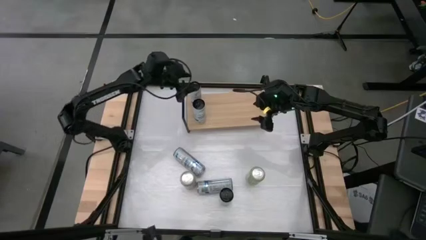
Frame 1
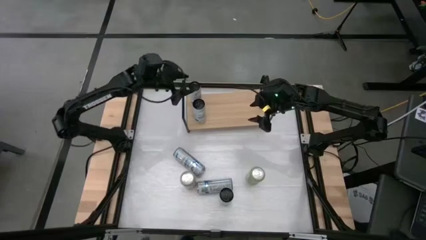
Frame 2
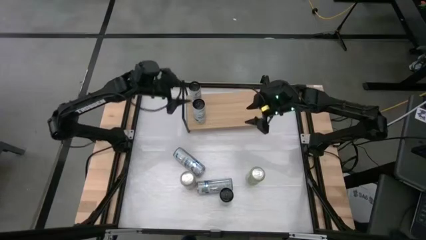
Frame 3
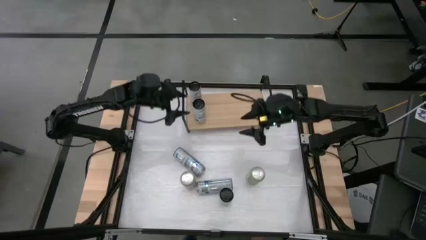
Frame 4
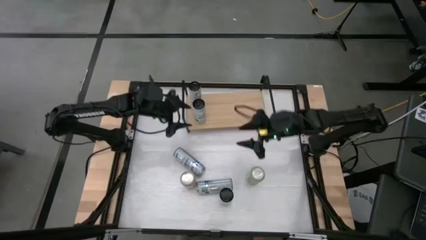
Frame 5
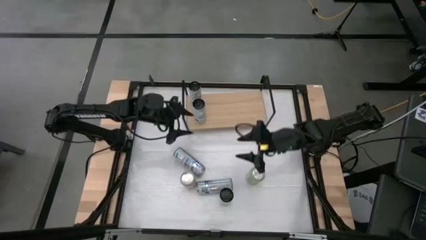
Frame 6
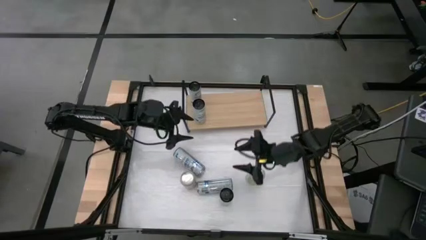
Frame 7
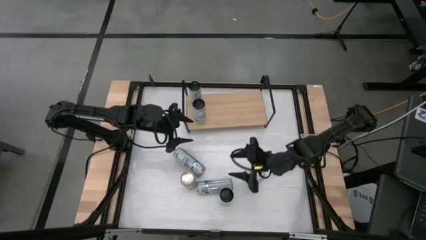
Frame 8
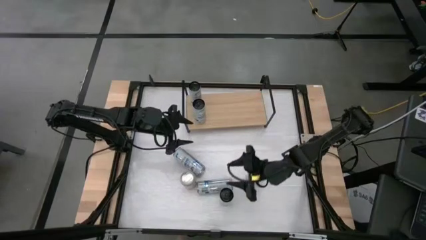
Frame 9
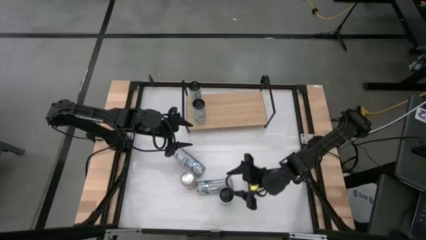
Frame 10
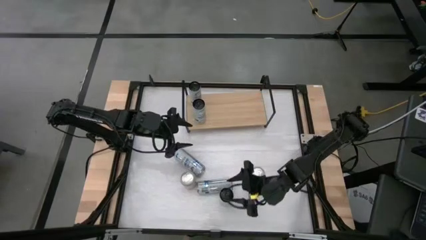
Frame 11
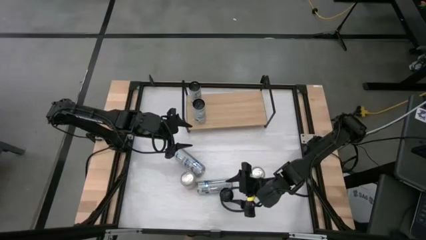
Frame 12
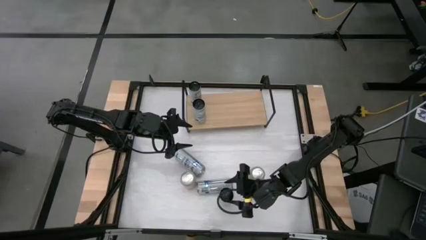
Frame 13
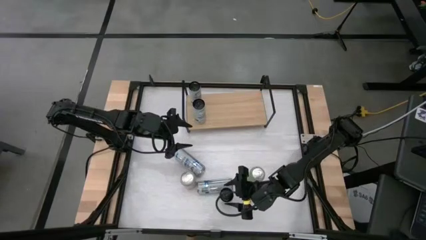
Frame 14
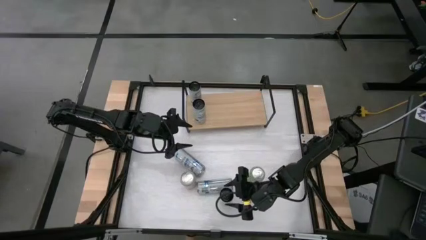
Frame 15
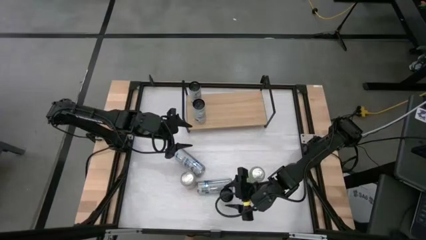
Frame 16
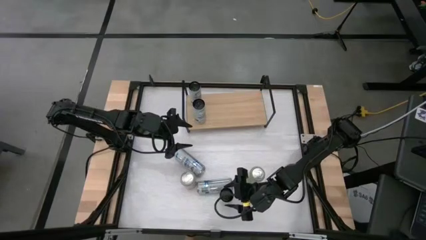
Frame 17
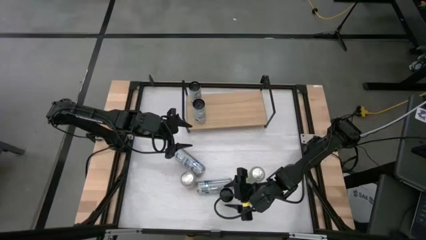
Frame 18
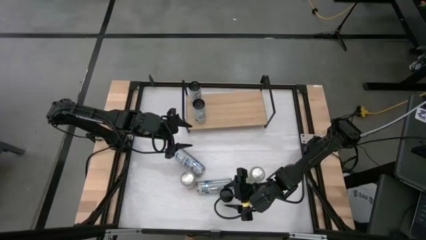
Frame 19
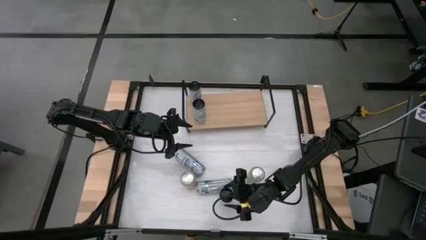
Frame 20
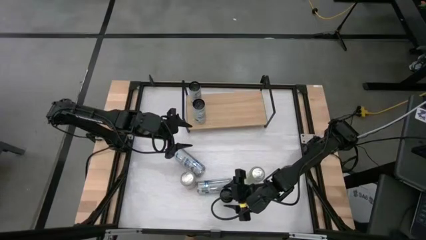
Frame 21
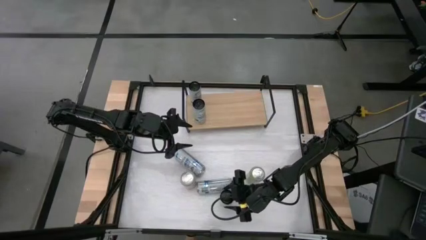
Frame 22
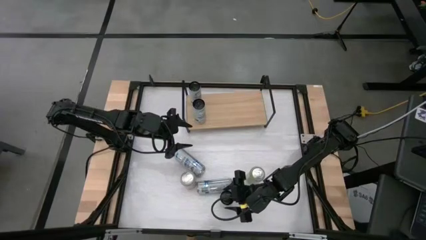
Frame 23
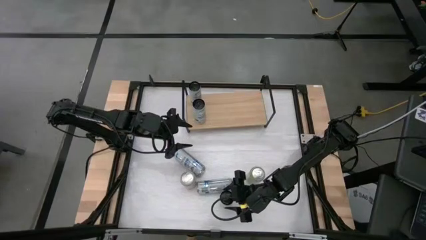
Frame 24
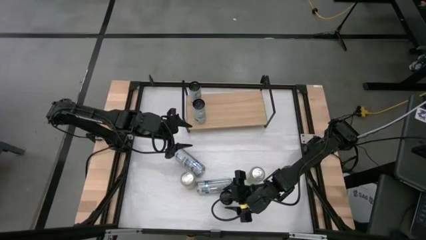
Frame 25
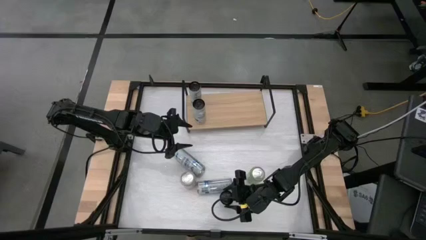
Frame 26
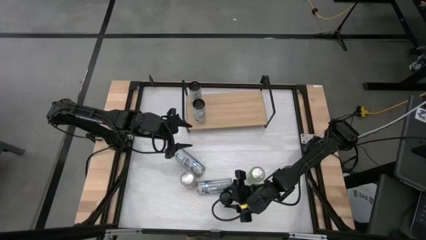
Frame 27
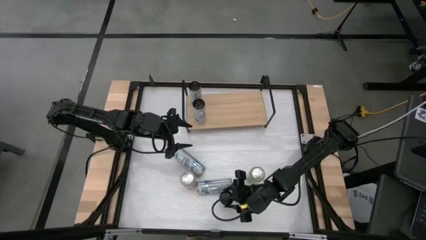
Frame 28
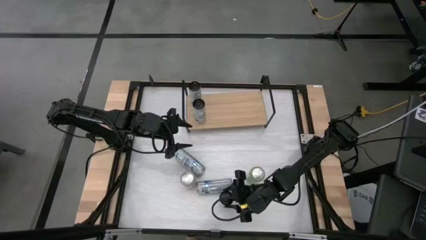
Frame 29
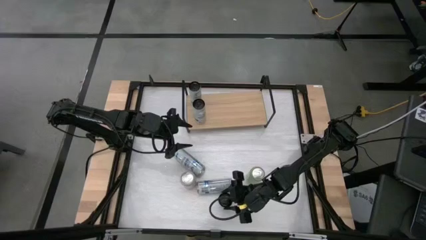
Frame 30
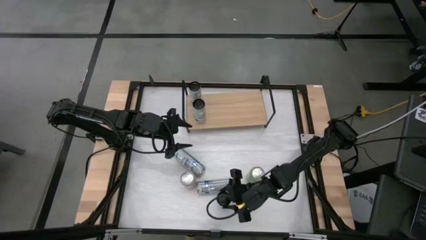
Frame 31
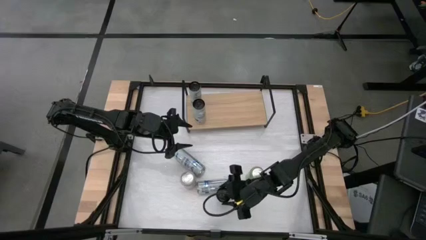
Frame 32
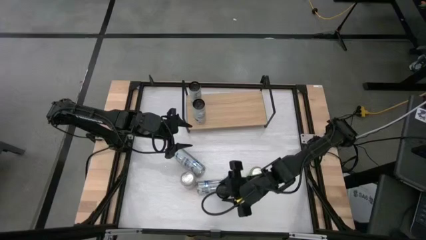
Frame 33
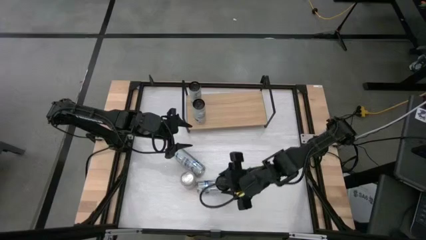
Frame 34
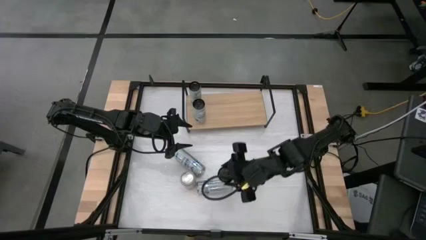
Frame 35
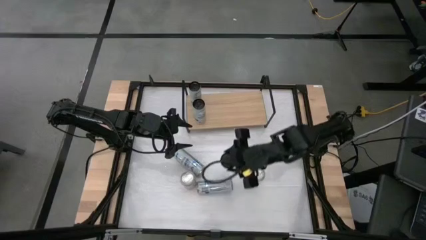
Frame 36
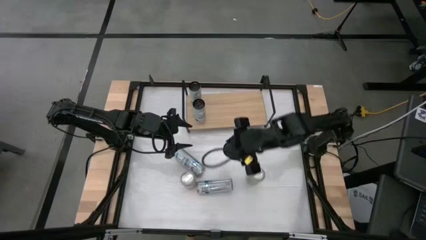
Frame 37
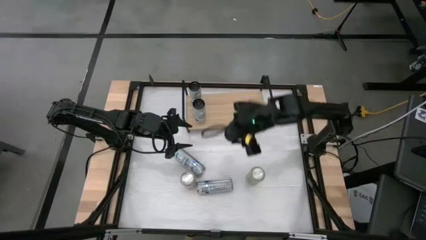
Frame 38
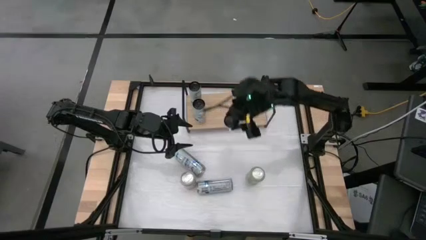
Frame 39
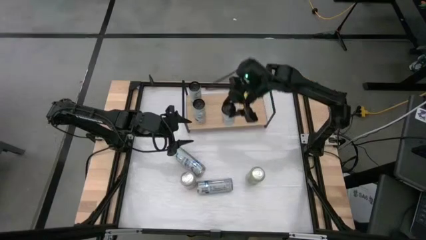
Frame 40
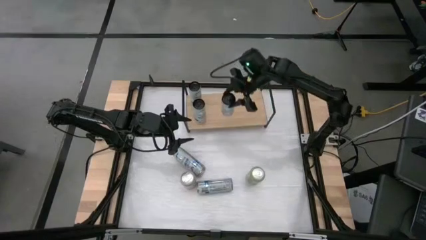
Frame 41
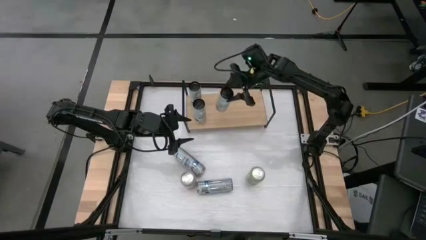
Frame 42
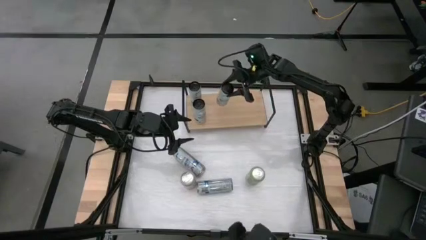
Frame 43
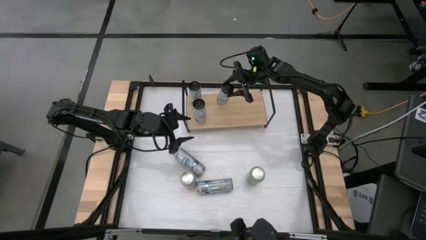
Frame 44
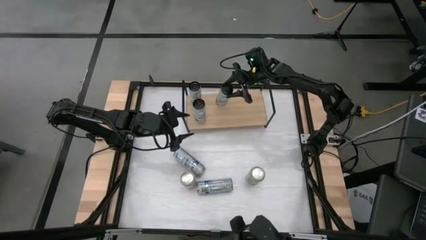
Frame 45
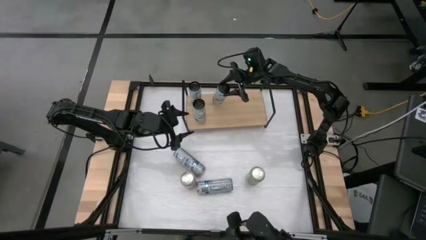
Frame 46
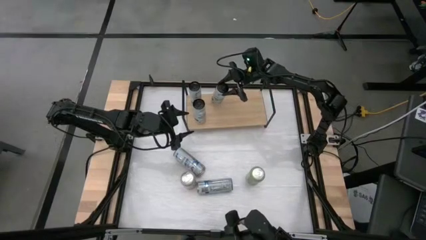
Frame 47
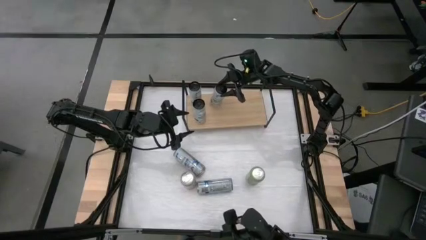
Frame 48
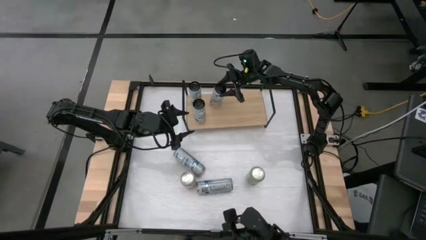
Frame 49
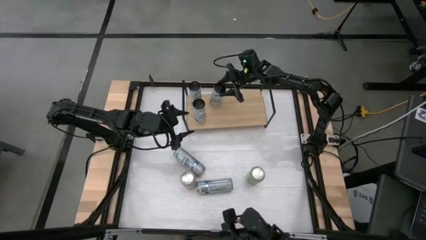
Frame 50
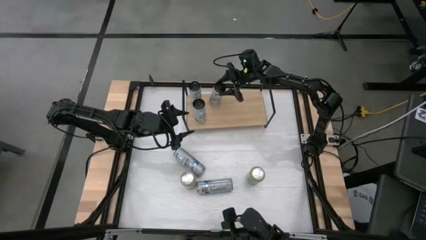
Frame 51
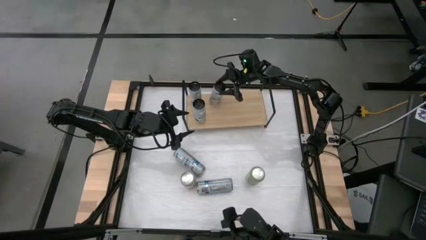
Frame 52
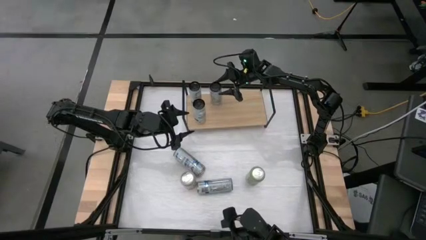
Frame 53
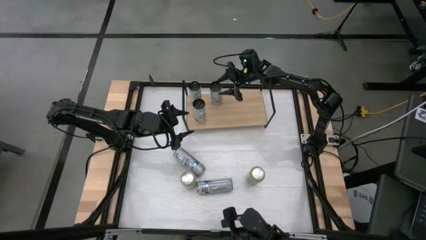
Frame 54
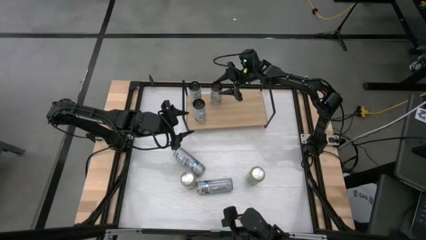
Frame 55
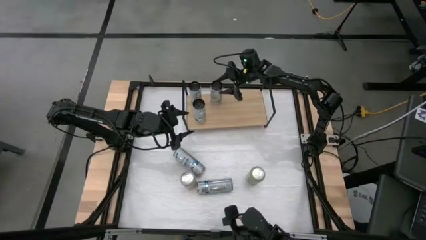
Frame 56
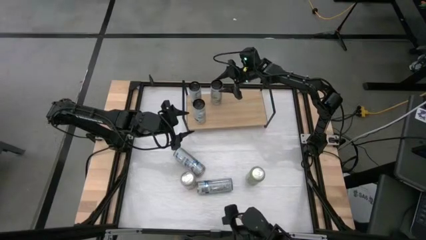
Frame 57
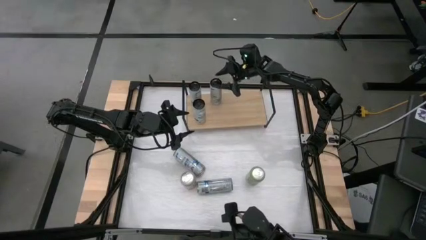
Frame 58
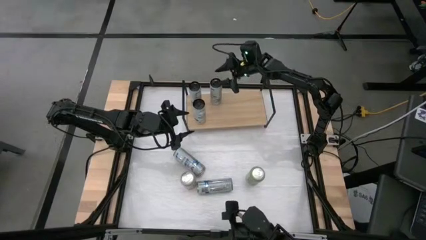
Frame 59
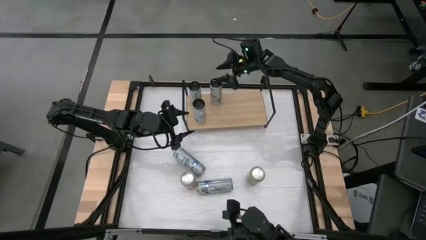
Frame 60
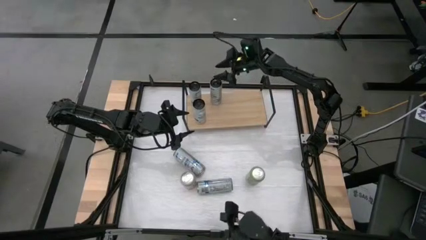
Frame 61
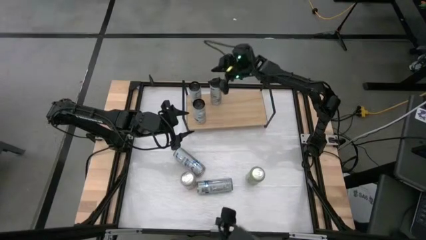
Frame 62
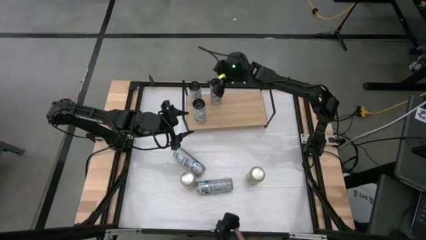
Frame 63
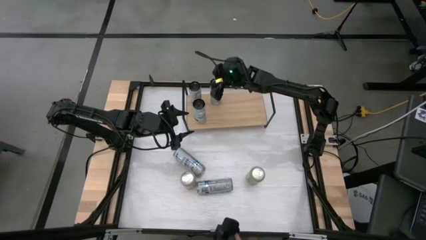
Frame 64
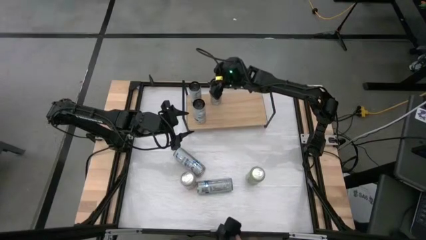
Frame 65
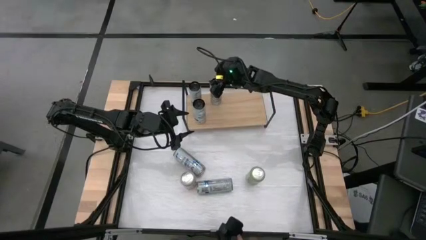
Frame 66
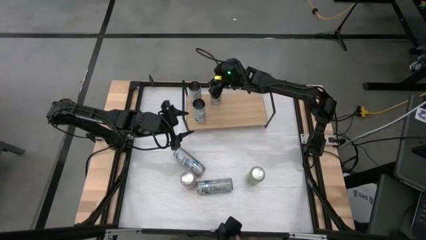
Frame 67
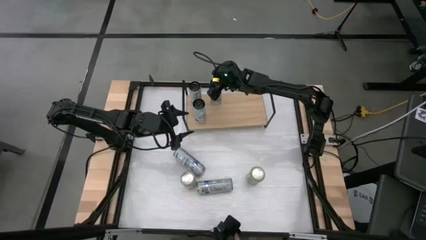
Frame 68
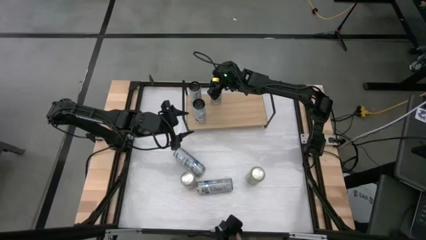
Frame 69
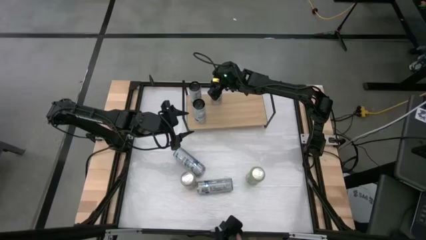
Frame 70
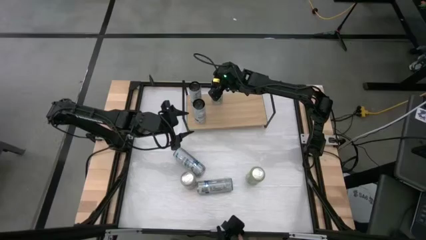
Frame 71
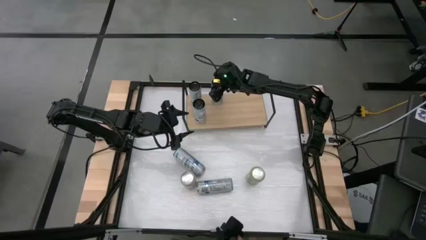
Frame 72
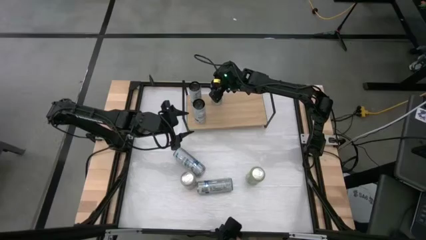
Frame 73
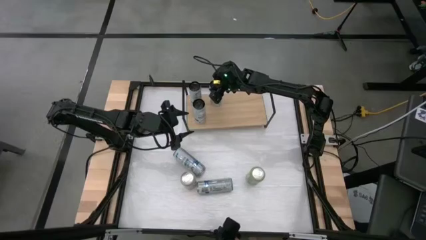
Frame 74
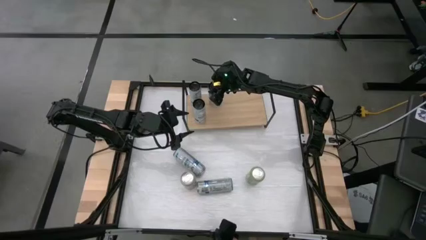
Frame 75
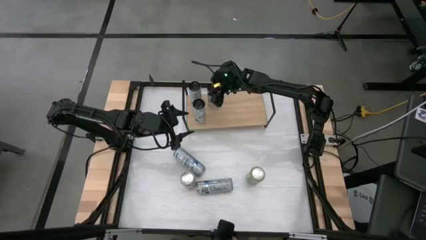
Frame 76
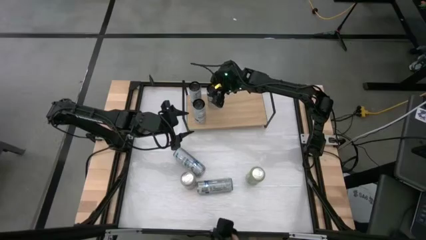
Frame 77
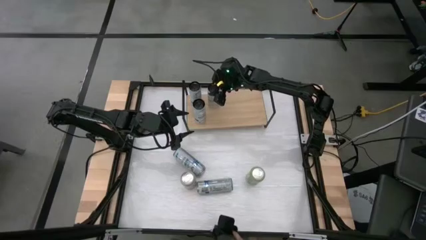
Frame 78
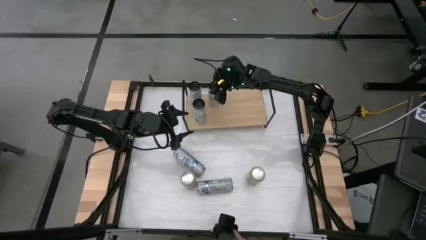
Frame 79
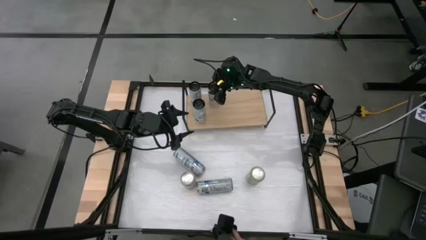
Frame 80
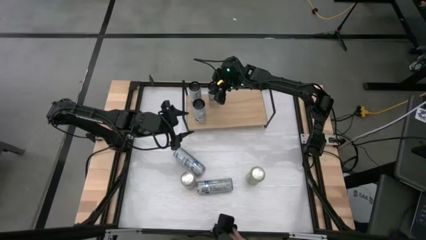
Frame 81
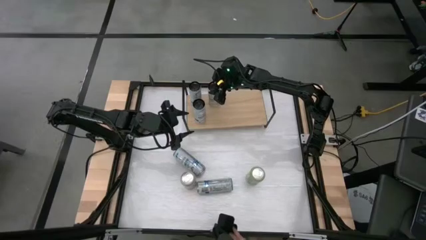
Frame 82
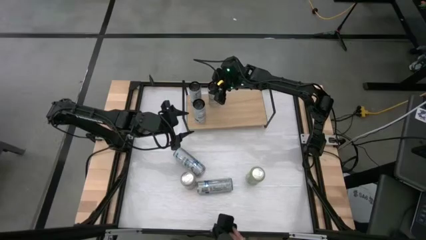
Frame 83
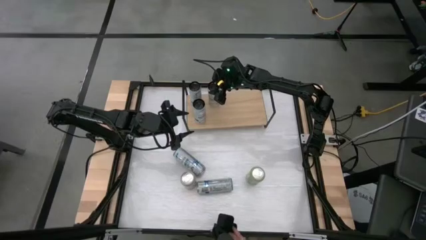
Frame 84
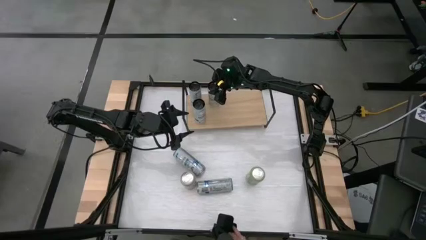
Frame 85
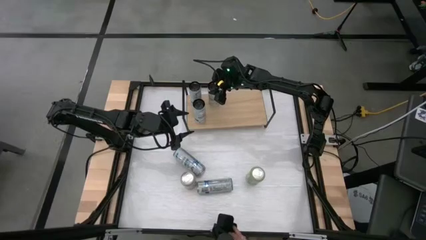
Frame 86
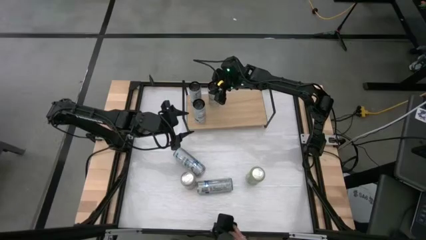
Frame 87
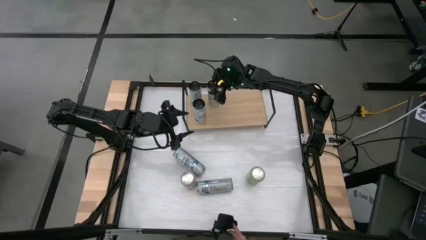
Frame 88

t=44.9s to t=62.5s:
Task: Place canned beverage on shelf
Put the white-blue soda can on the shelf
